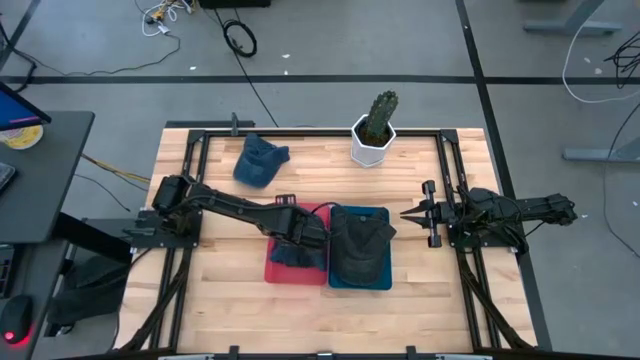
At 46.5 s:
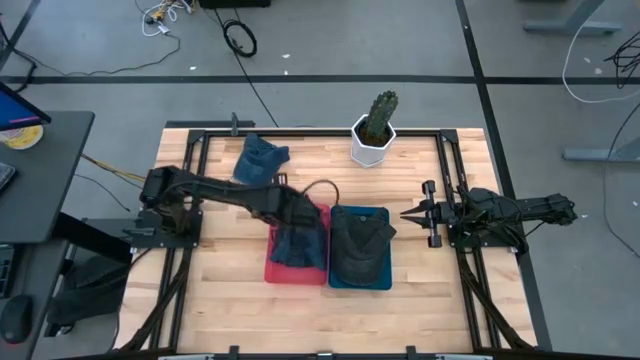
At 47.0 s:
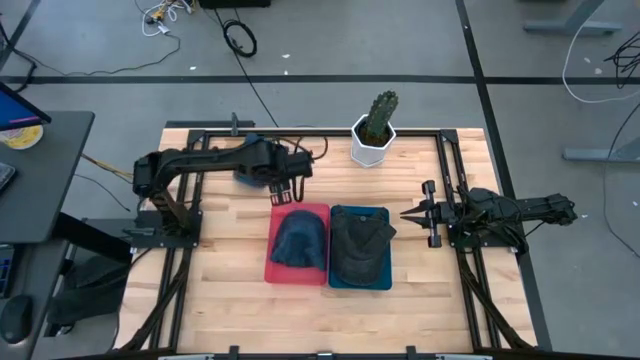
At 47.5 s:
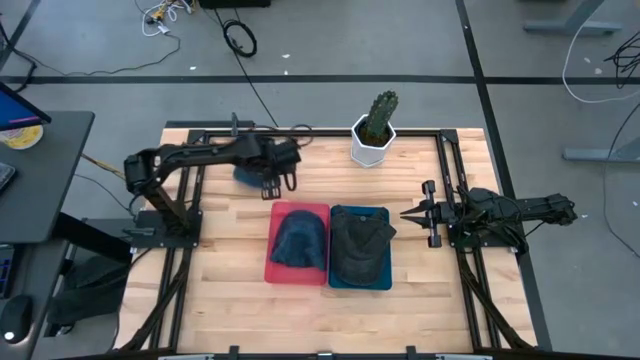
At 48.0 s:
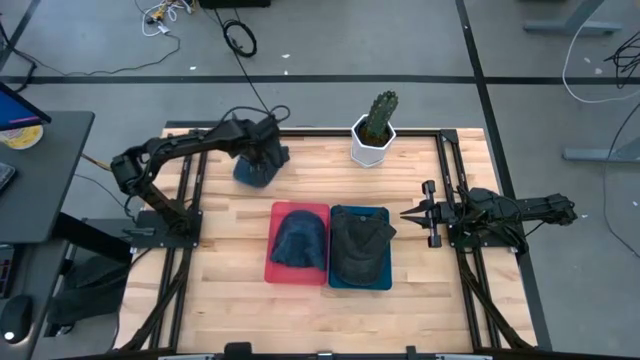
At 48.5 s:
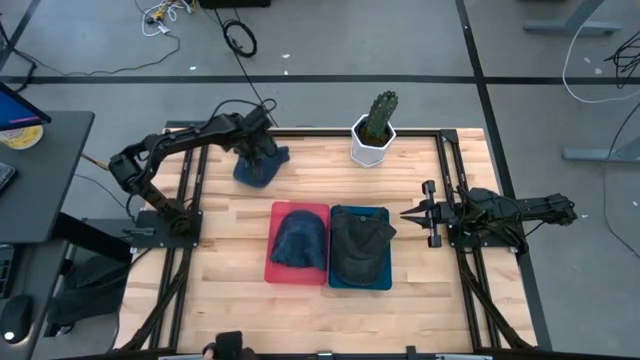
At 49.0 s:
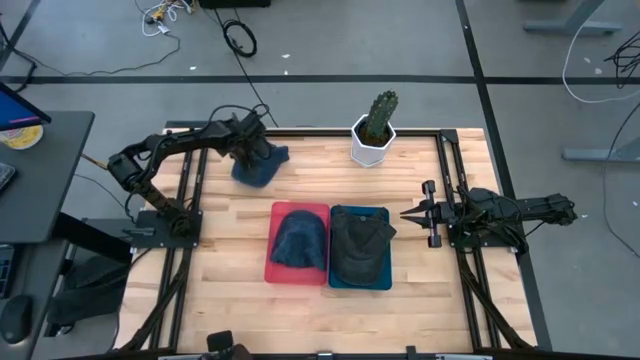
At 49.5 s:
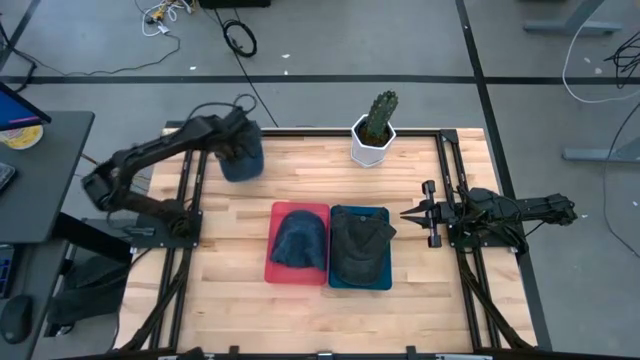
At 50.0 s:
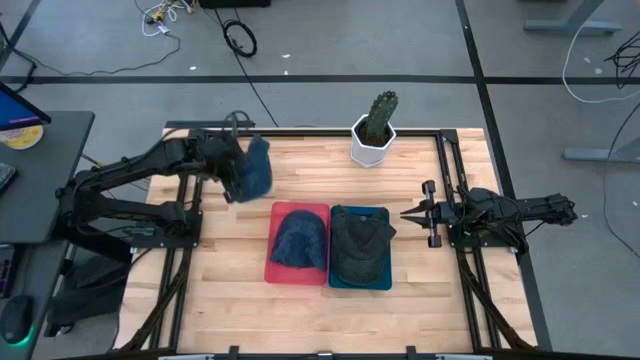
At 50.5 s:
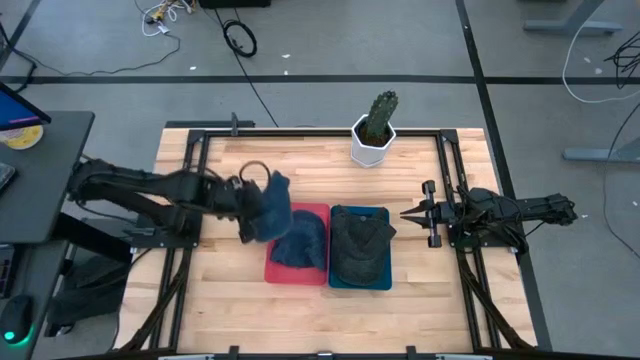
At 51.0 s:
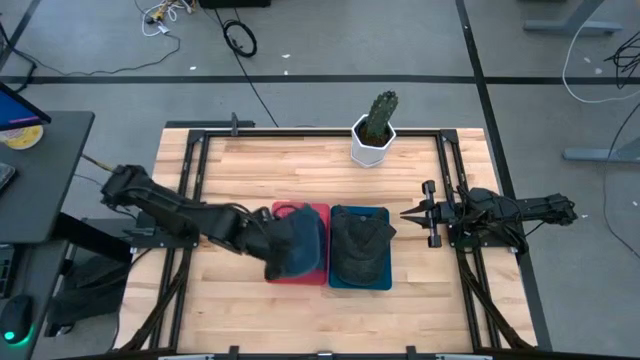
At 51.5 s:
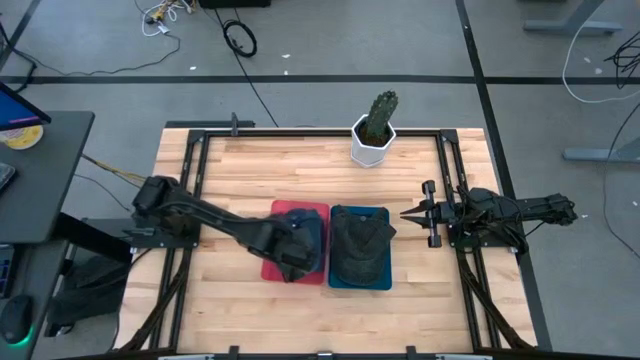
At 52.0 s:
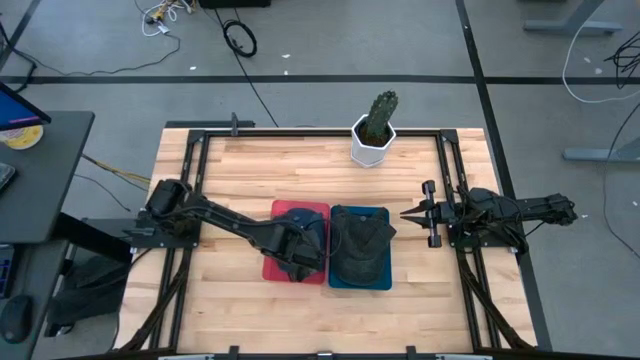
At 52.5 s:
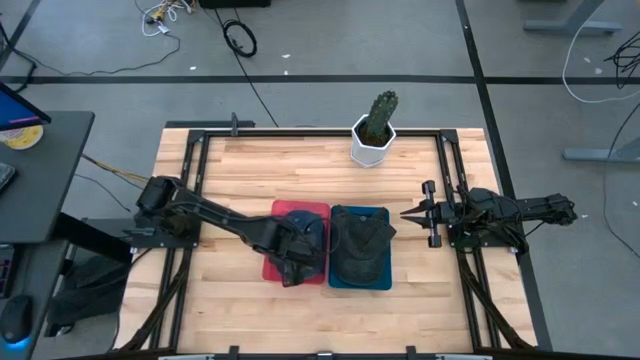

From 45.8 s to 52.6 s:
Task: Pick & Place hat
Put the blue cap into the red bin

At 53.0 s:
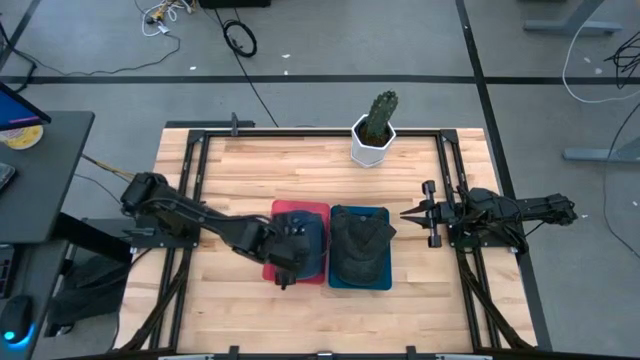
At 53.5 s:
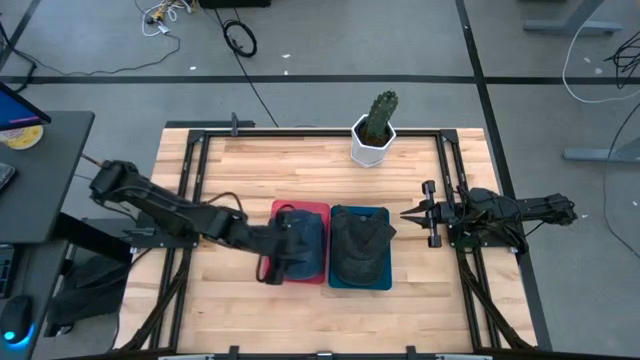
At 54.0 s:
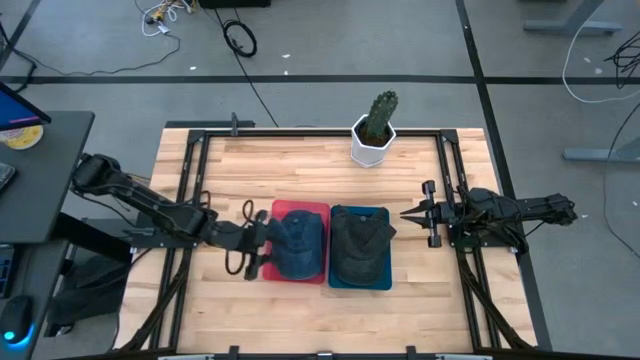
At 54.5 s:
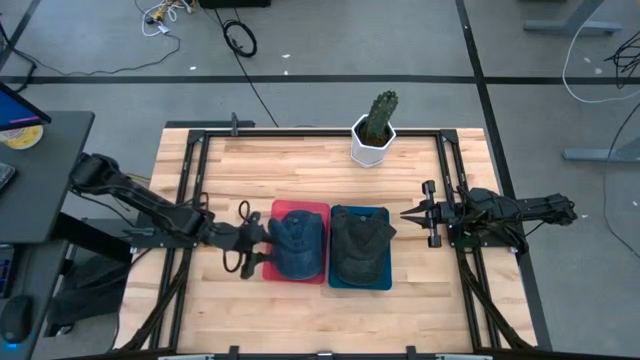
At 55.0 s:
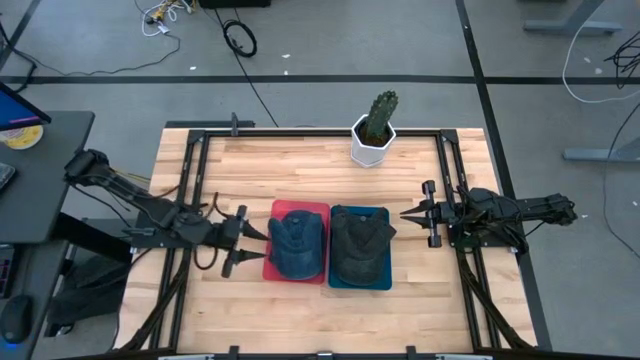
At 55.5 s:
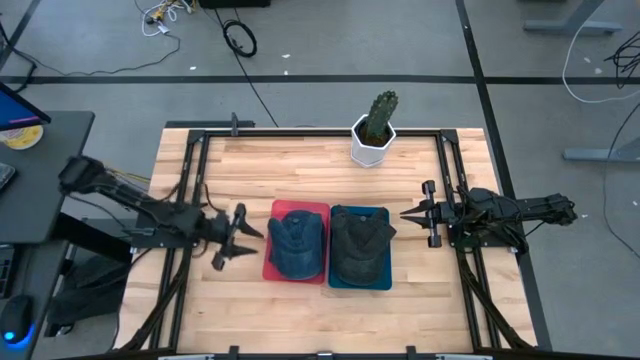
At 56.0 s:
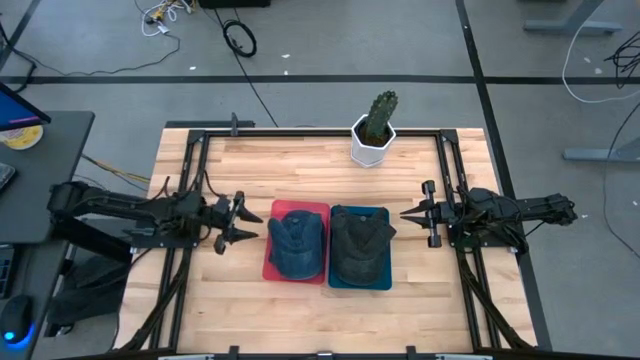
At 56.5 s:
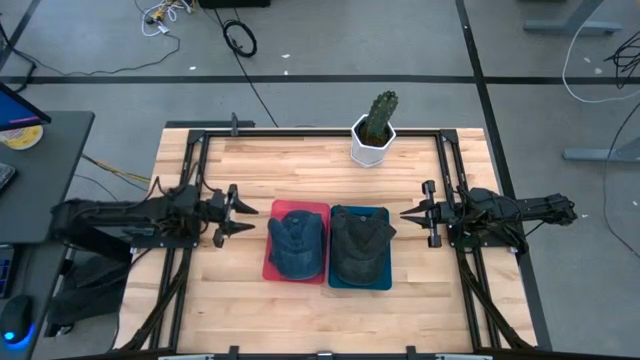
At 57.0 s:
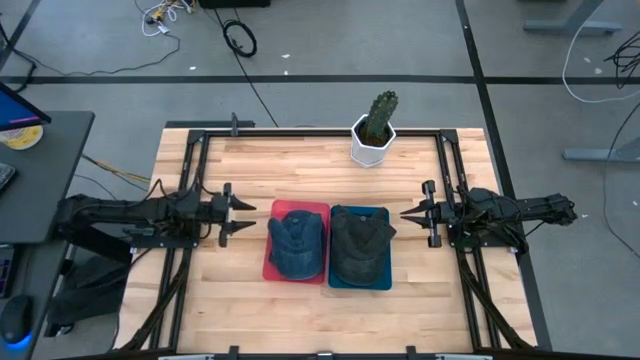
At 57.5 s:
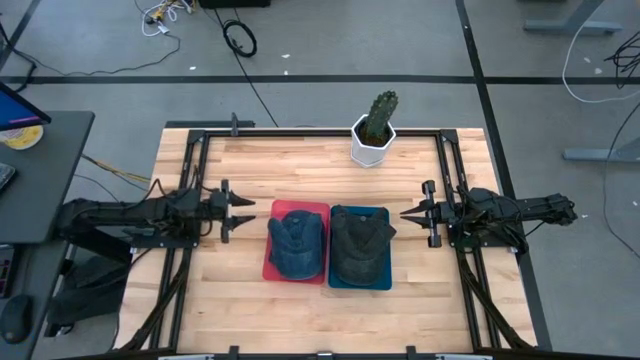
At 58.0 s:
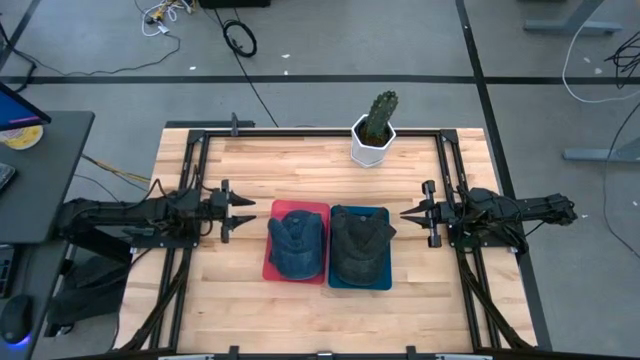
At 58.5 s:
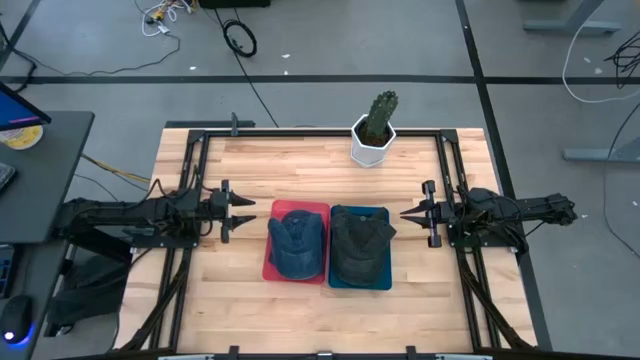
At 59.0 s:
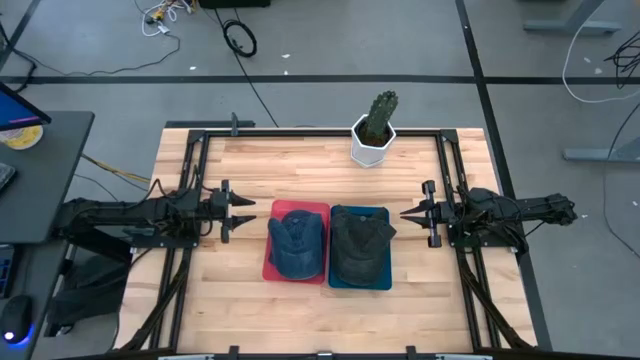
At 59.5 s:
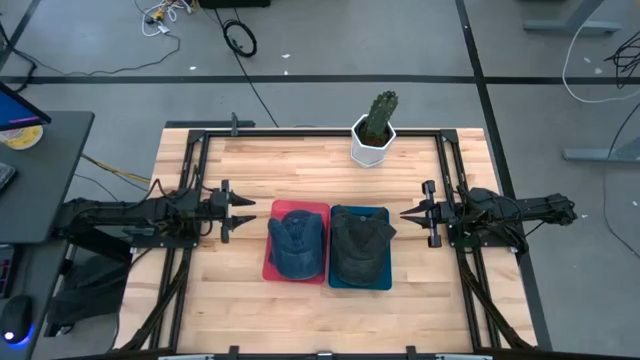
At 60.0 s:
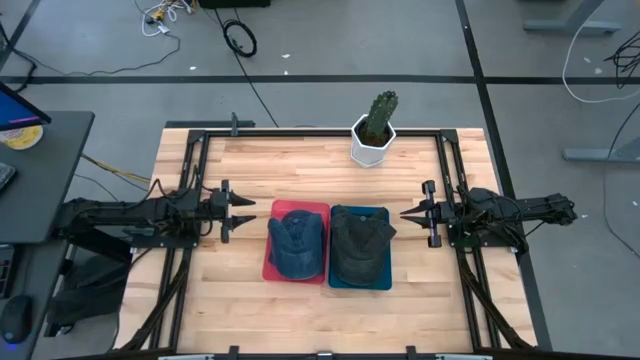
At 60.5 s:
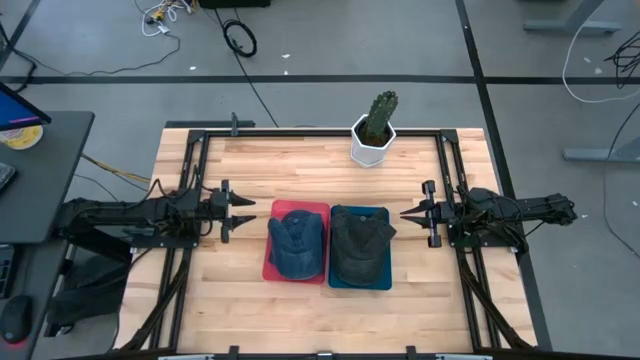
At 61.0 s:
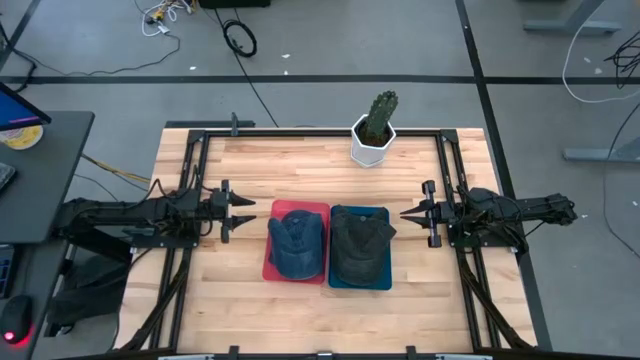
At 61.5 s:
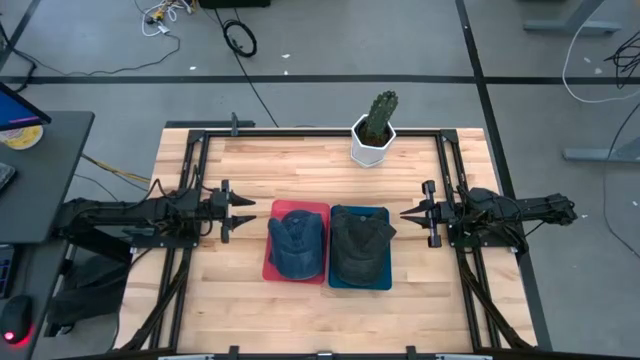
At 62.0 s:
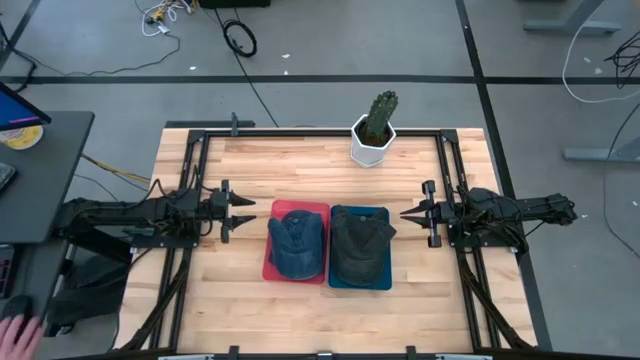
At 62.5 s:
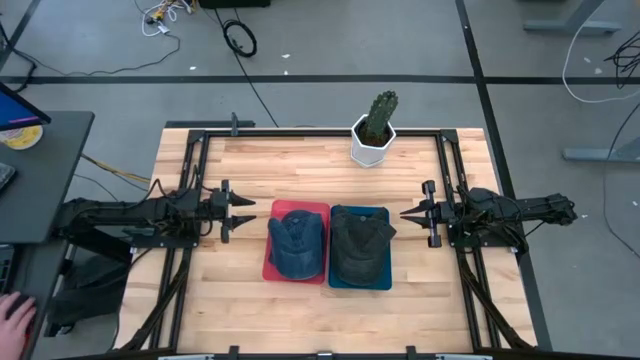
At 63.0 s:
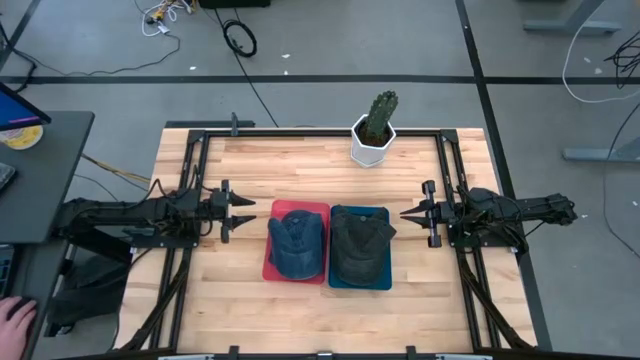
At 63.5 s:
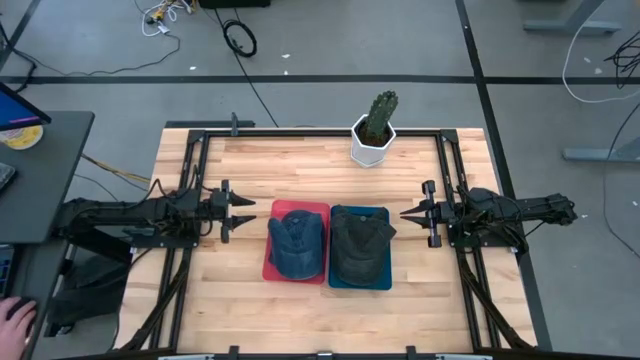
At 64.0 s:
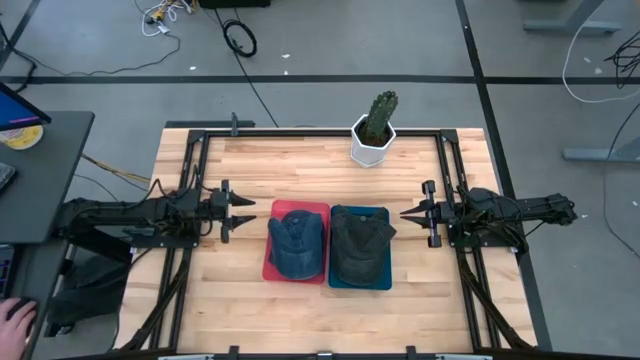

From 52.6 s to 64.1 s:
Return to Home Position

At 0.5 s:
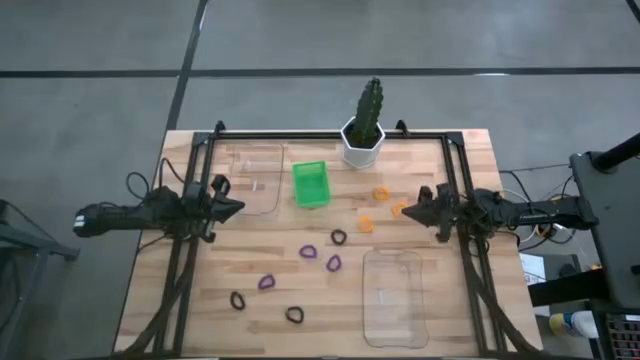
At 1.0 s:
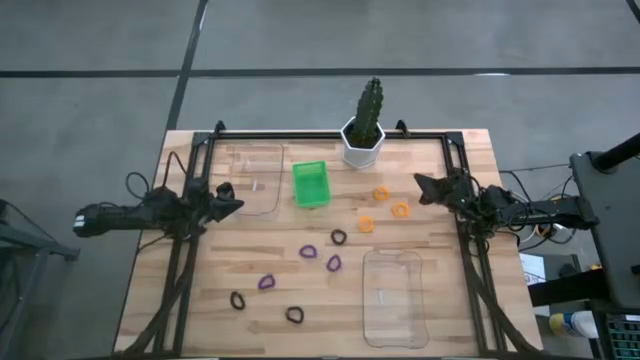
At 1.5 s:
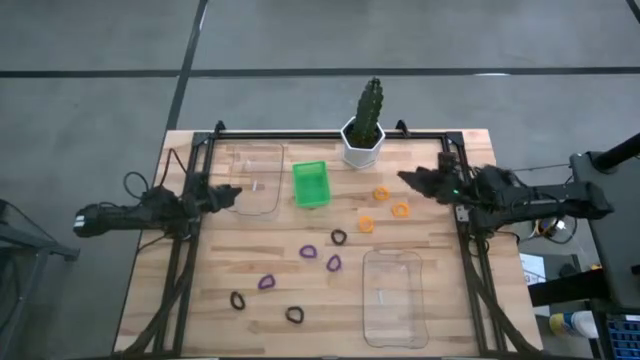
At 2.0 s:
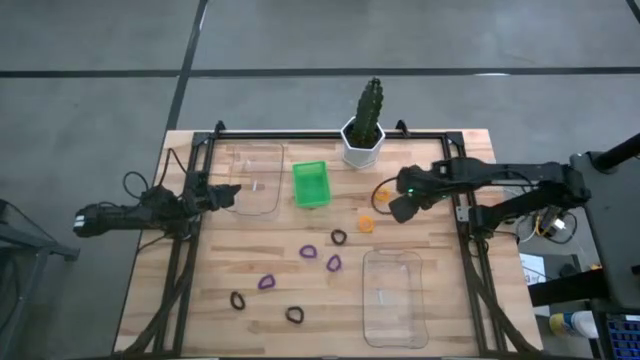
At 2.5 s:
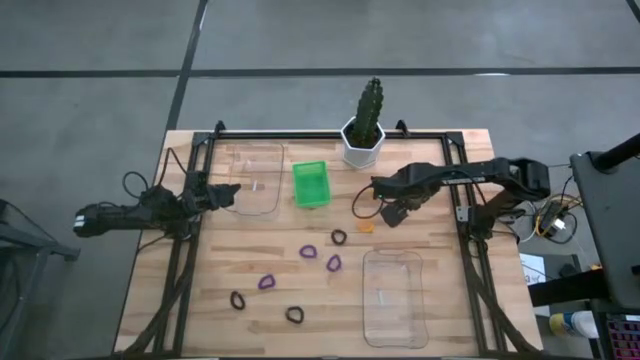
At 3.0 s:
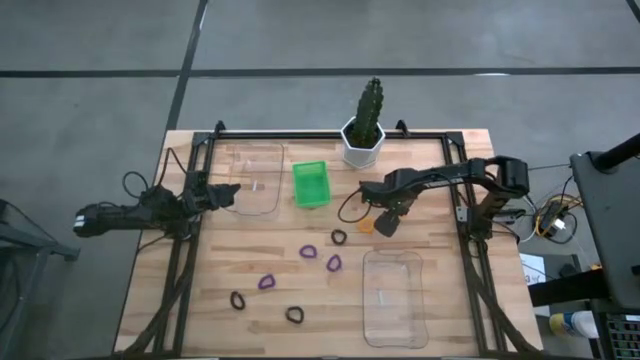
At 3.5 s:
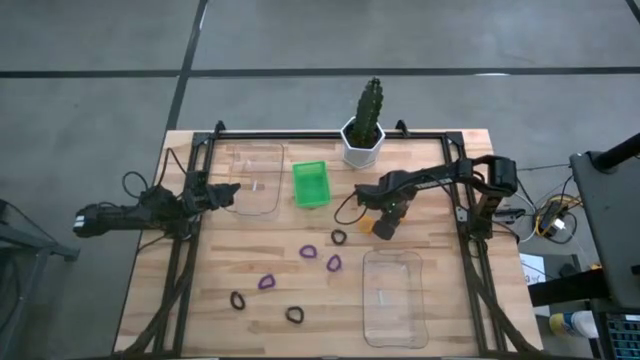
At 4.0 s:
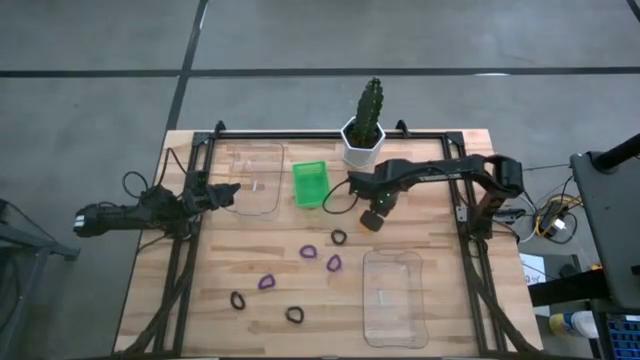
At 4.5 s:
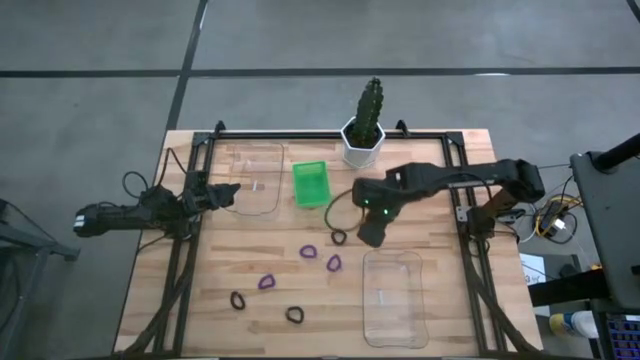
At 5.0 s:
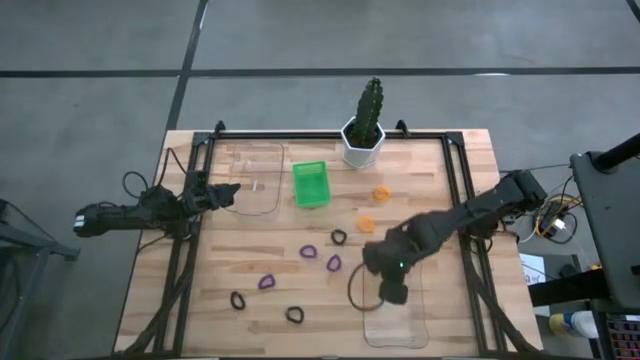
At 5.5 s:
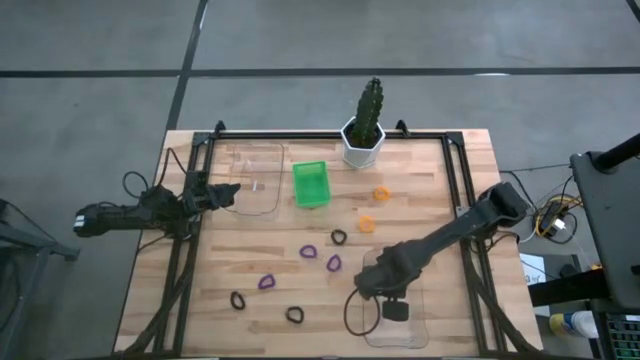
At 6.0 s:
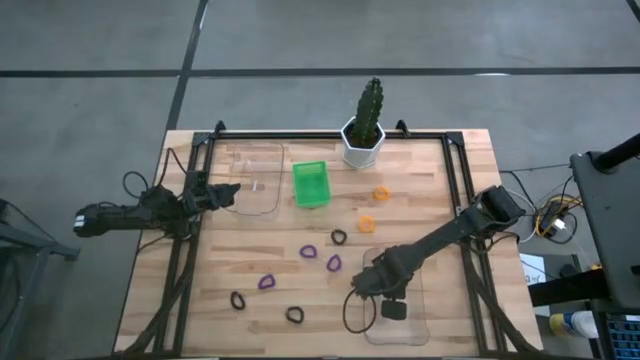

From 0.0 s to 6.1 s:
Task: Sort spring keychains
Put the middle yellow spring keychain into the bottom transparent bin
